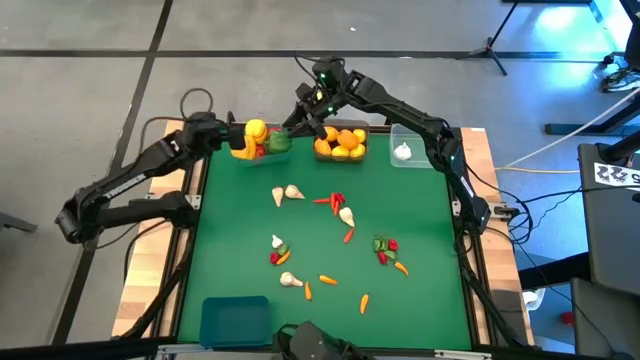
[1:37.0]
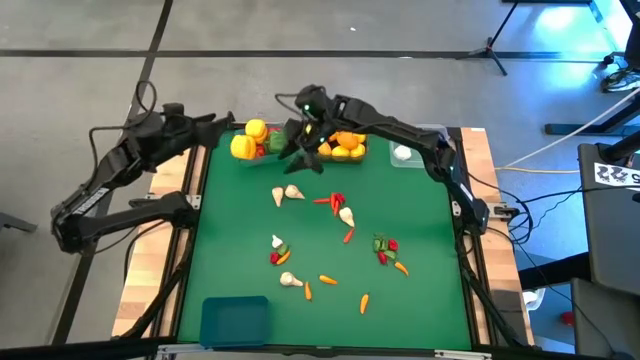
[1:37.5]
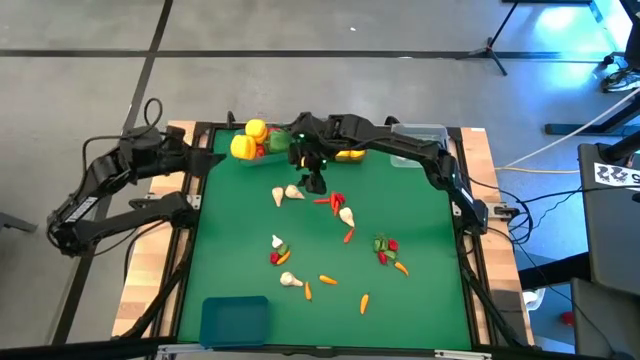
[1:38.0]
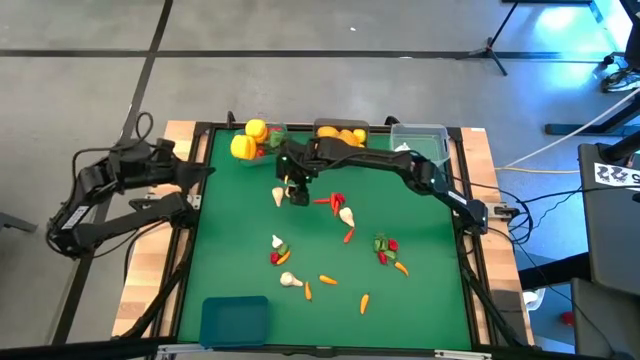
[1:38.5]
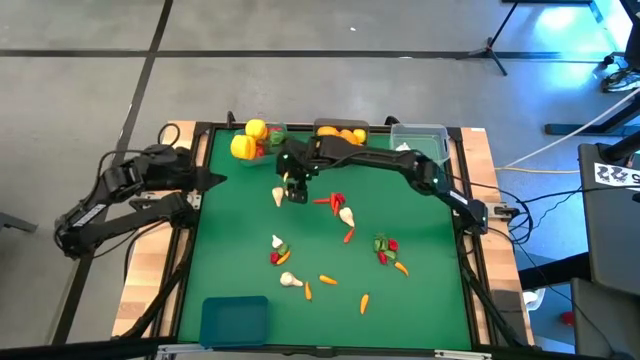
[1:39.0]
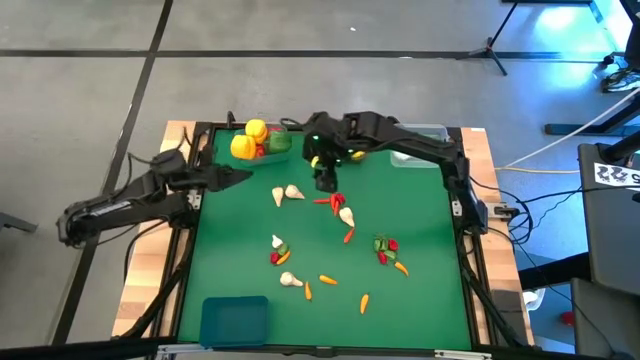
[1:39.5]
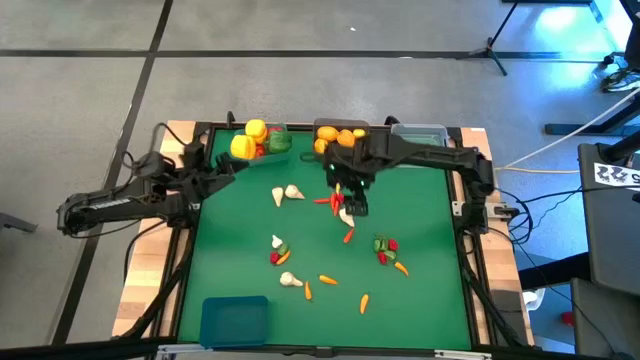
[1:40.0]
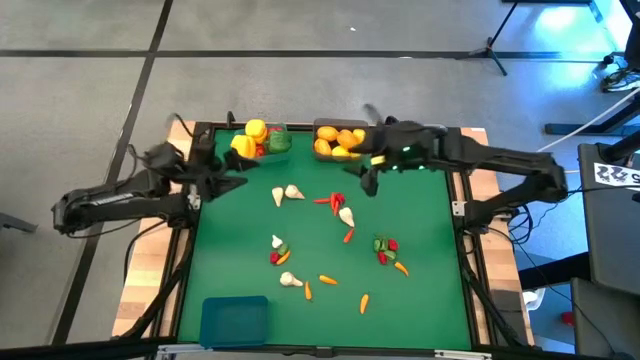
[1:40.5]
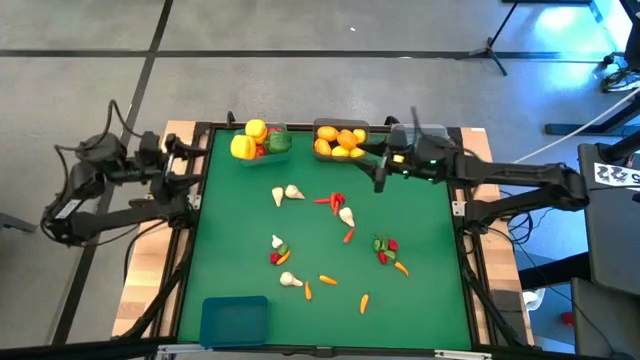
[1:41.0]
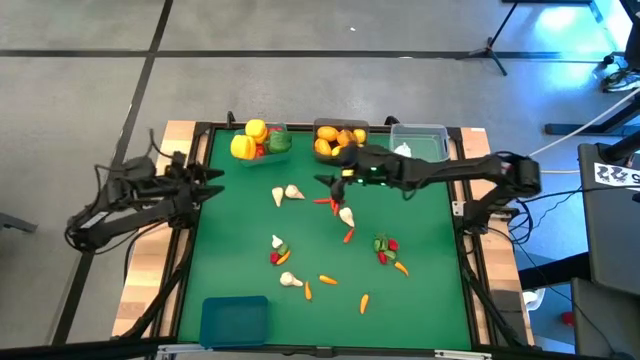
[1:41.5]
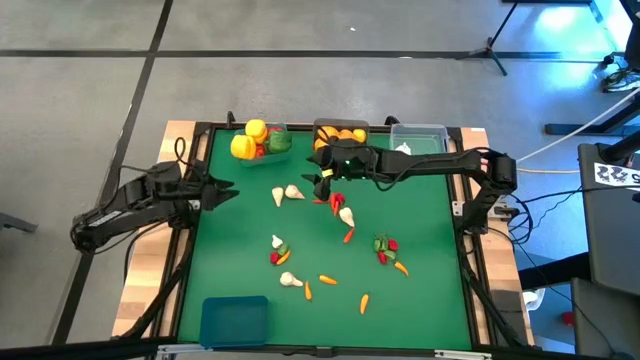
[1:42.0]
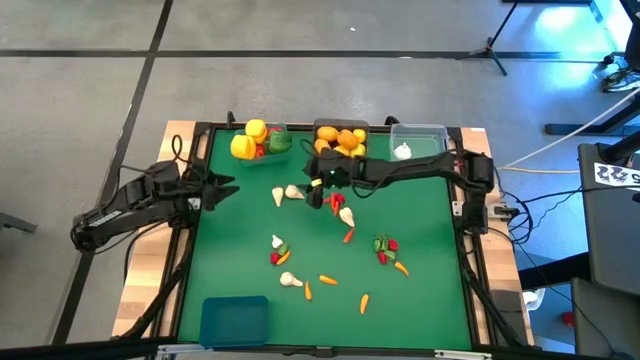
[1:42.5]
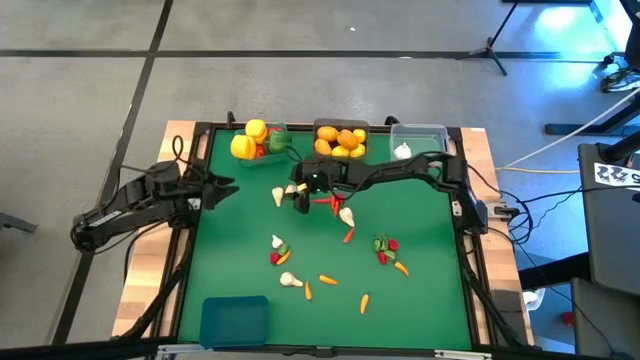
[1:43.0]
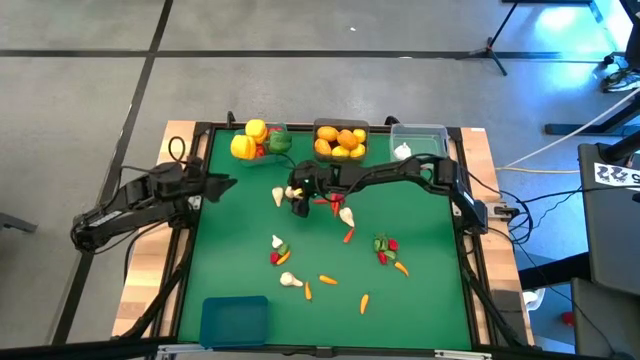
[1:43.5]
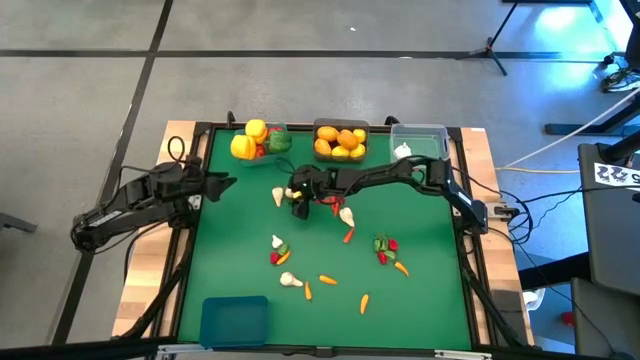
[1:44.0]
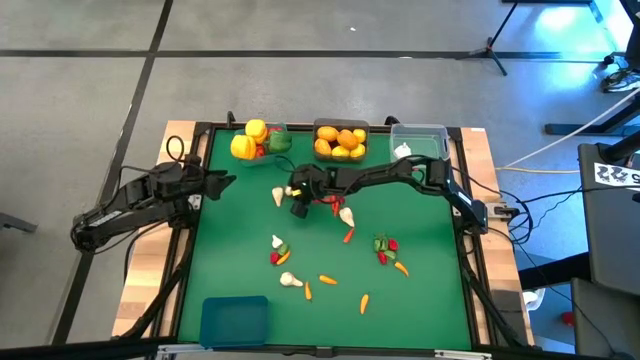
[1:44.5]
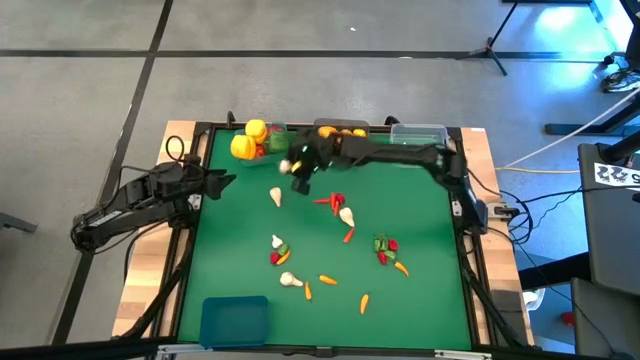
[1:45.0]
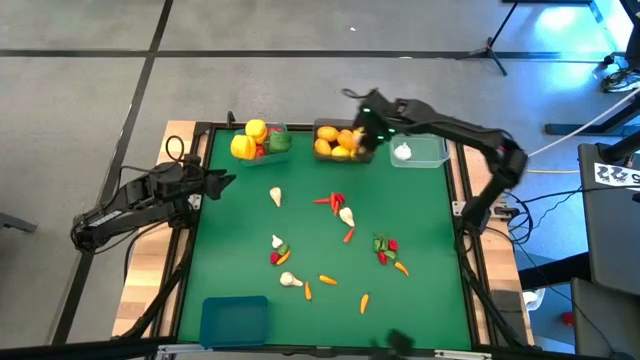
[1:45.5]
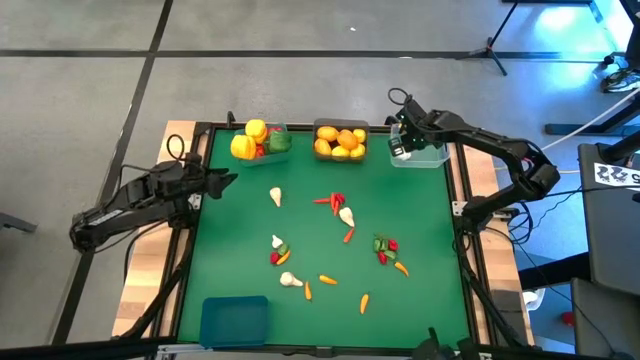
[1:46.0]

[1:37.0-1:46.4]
Task: Sort produce into baskets
Put the white garlic into the transparent bin

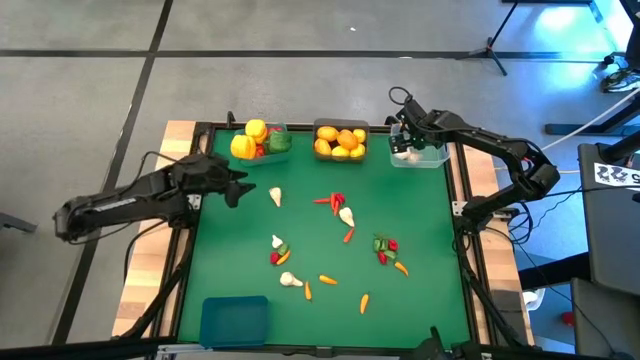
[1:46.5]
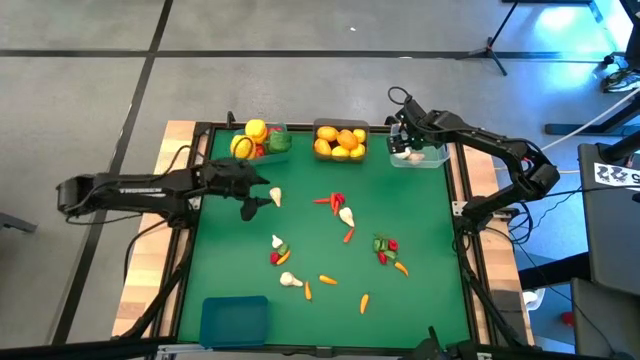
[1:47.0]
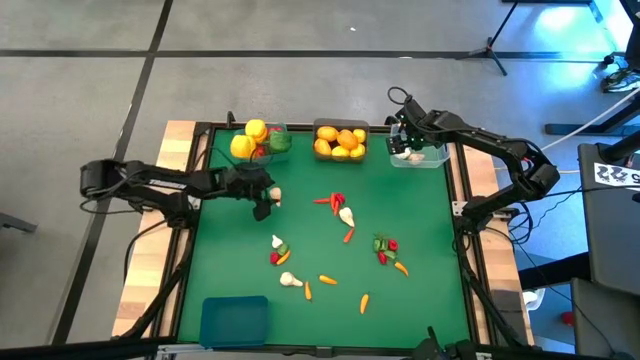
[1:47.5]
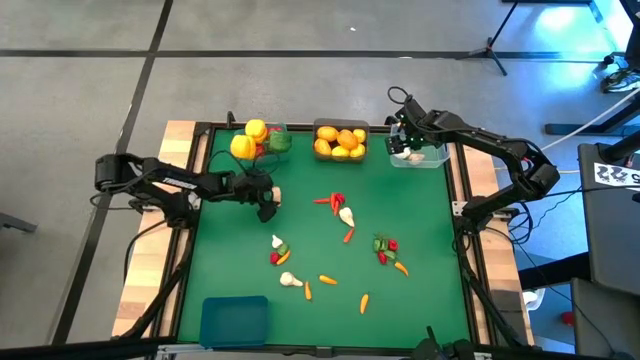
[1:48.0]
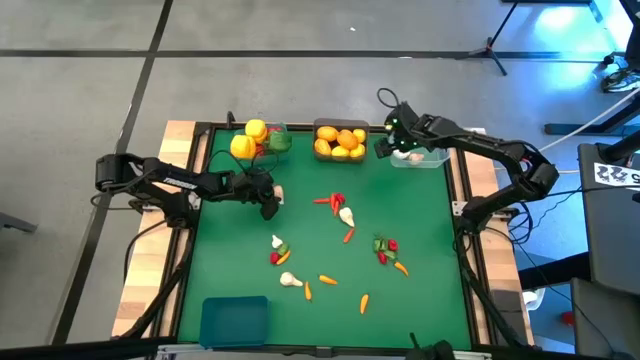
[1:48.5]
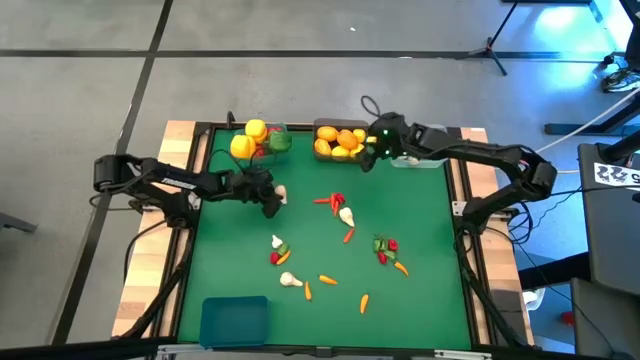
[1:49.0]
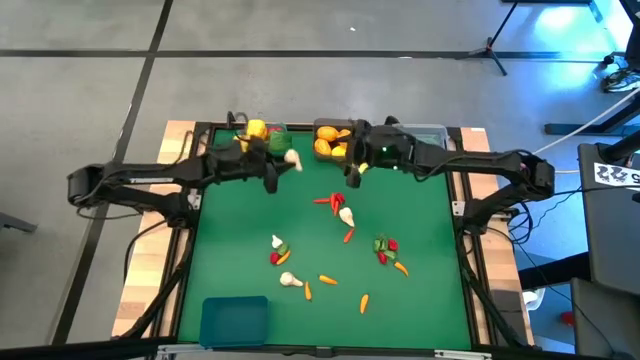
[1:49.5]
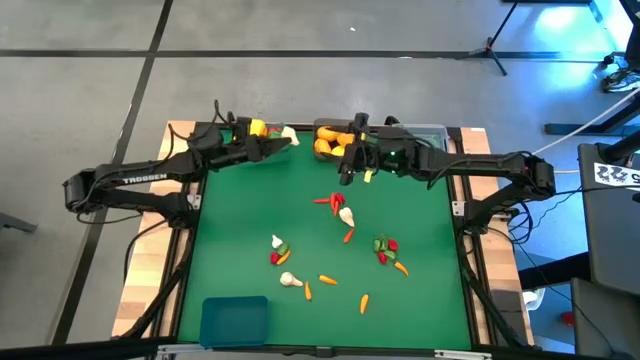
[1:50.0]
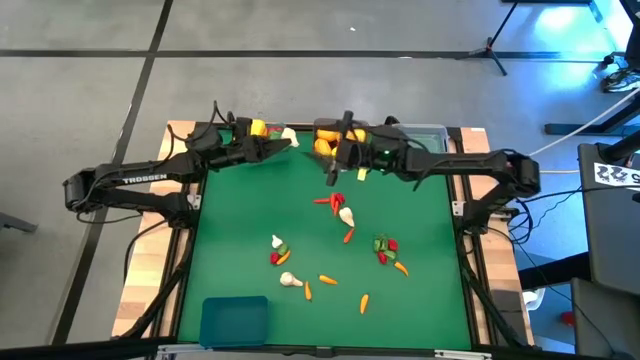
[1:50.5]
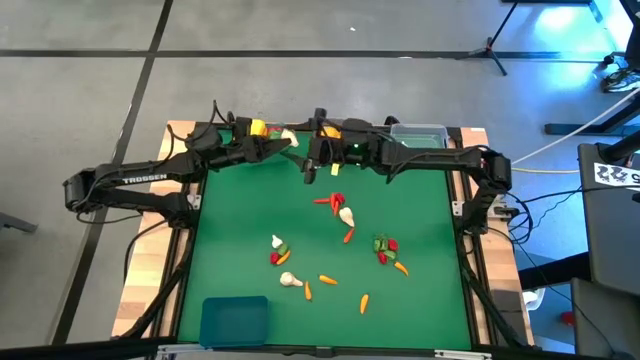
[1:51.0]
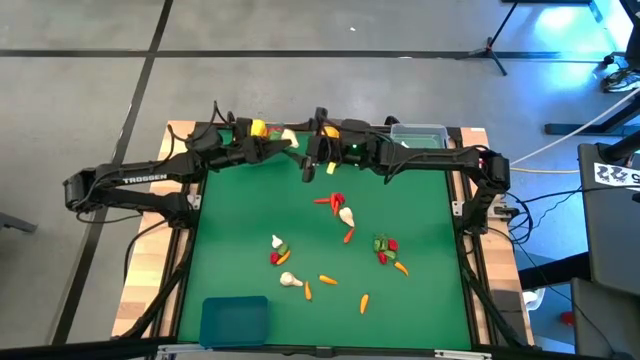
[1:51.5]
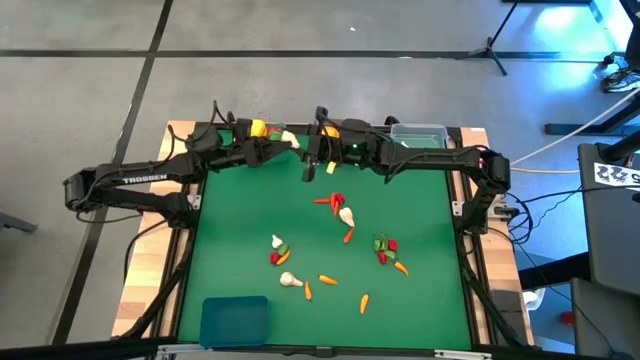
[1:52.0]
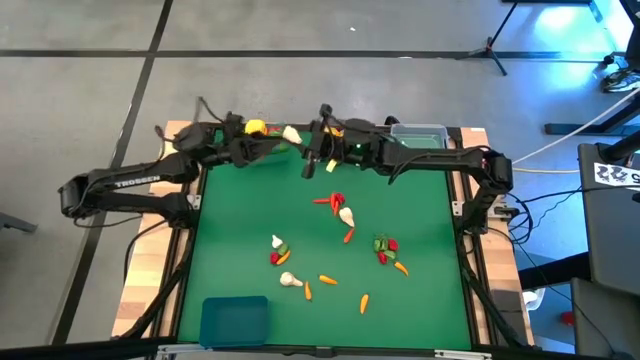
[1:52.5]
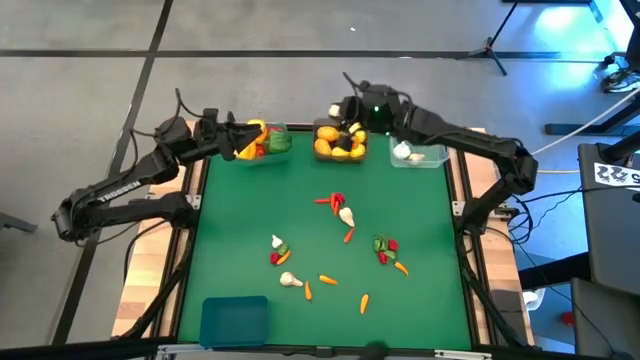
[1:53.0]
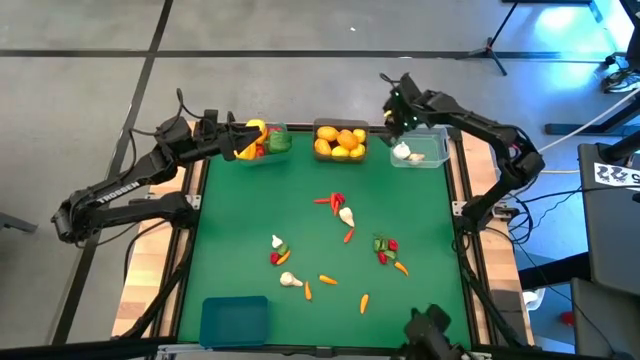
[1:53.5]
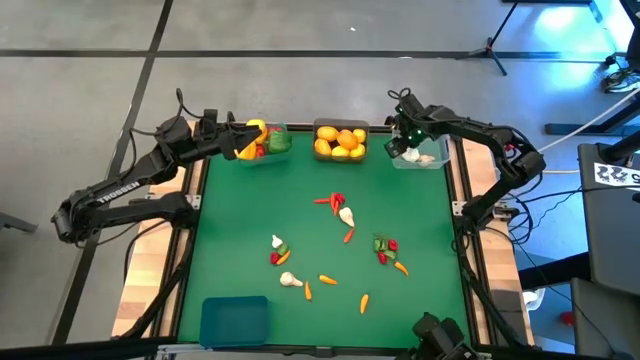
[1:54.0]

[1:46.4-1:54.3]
Put the white garlic into the transparent bin

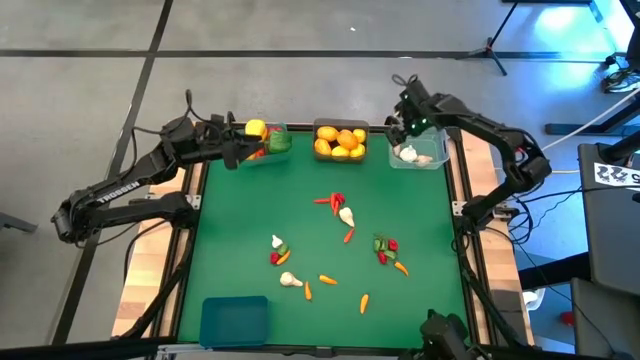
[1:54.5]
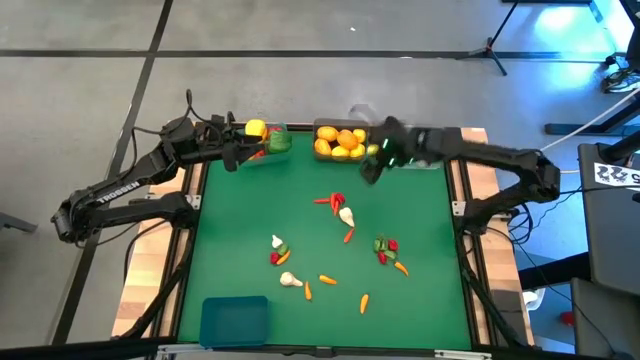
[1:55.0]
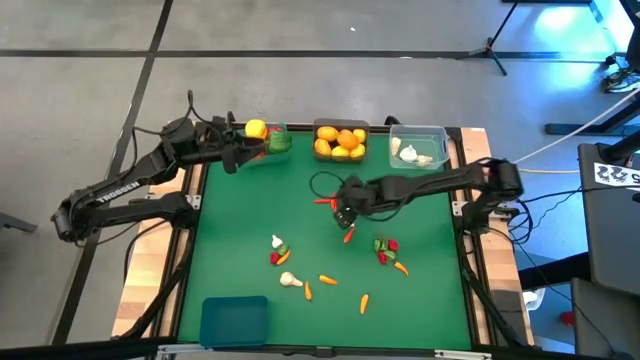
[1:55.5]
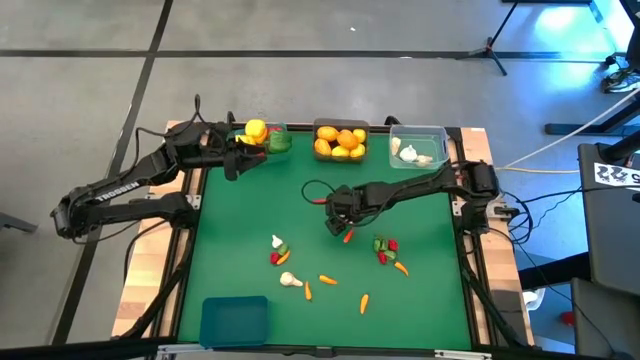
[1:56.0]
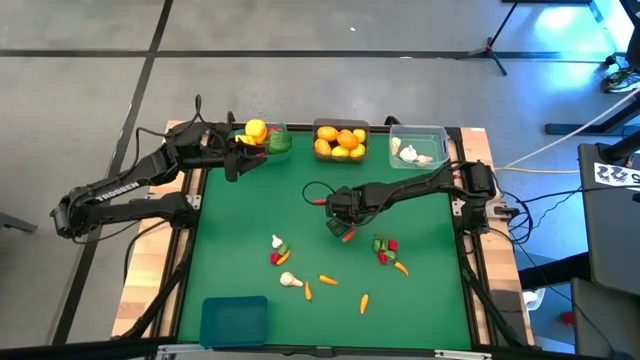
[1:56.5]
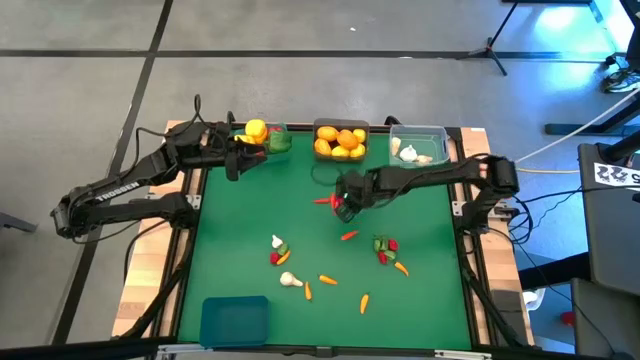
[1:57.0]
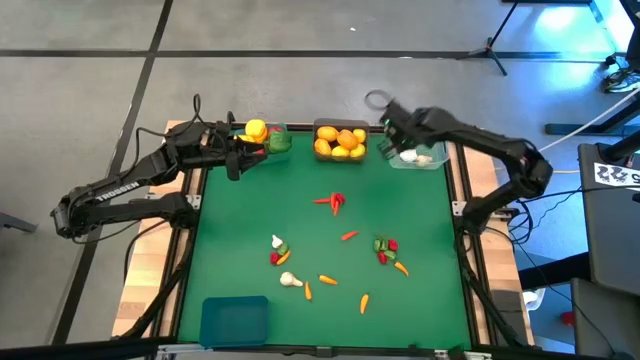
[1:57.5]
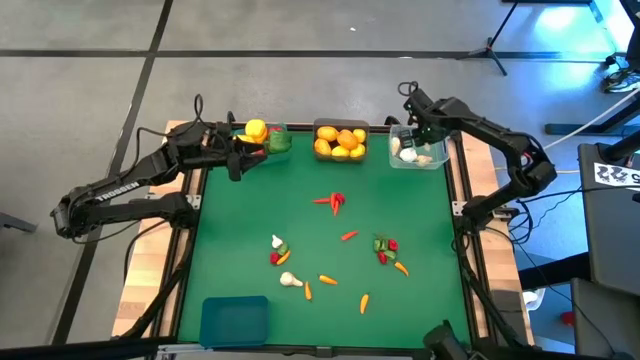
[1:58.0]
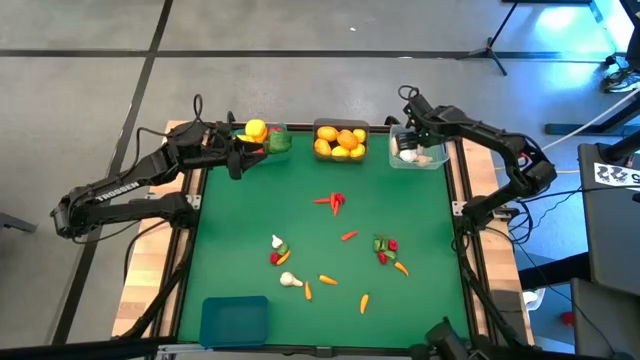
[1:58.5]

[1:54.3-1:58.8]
Put the white garlic into the transparent bin
